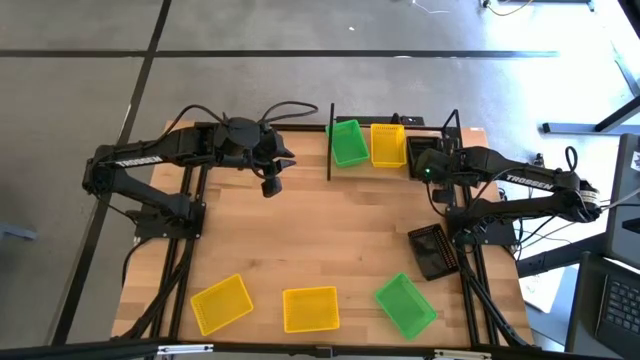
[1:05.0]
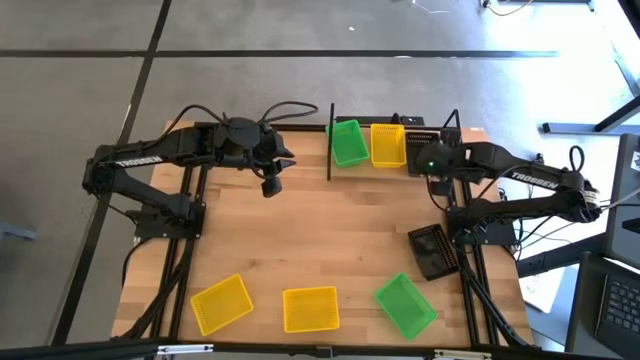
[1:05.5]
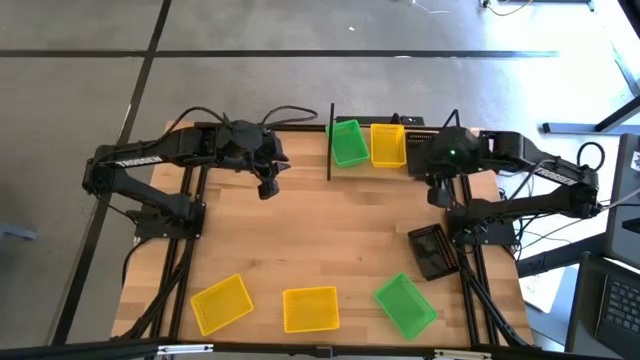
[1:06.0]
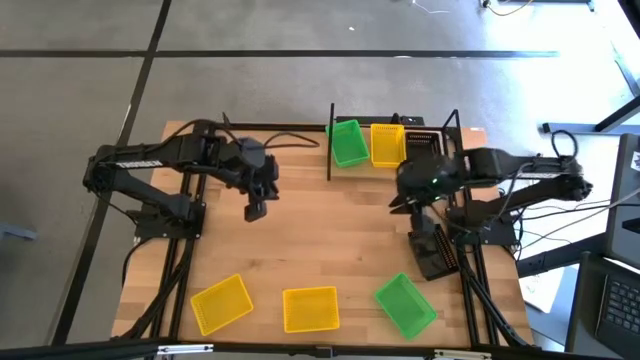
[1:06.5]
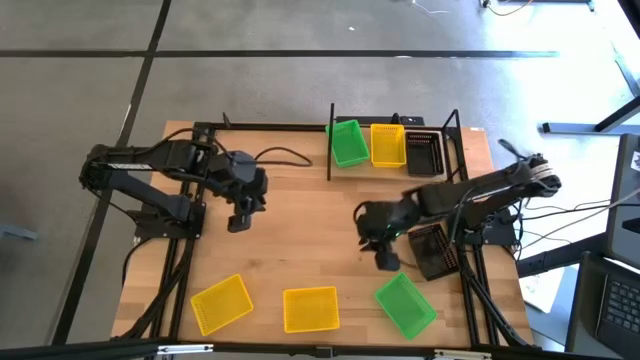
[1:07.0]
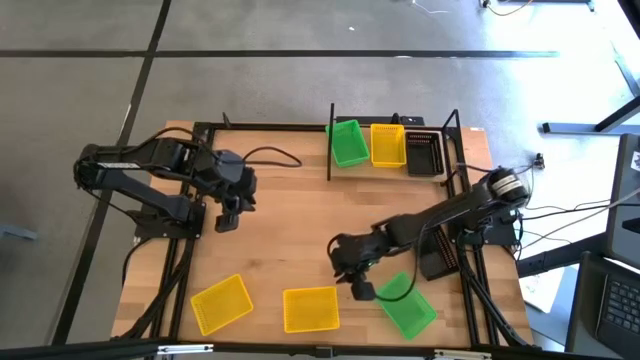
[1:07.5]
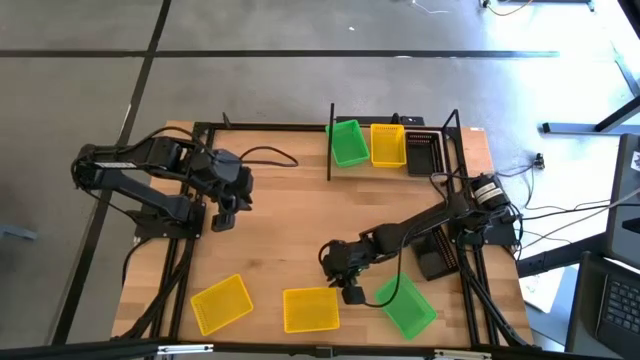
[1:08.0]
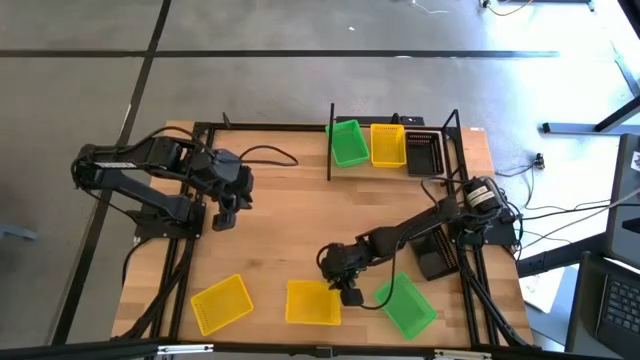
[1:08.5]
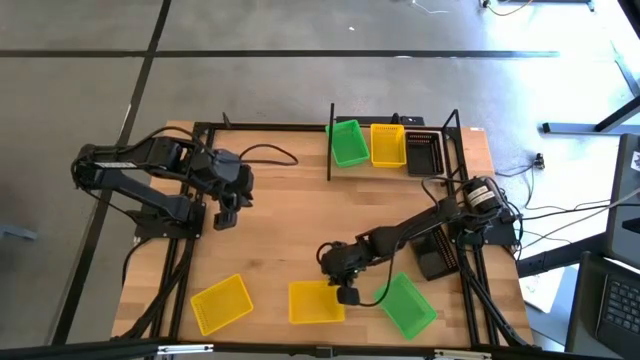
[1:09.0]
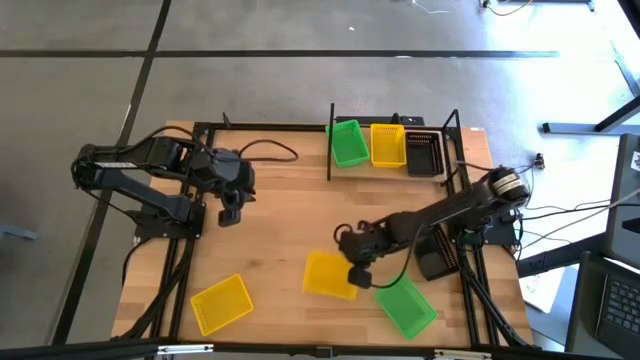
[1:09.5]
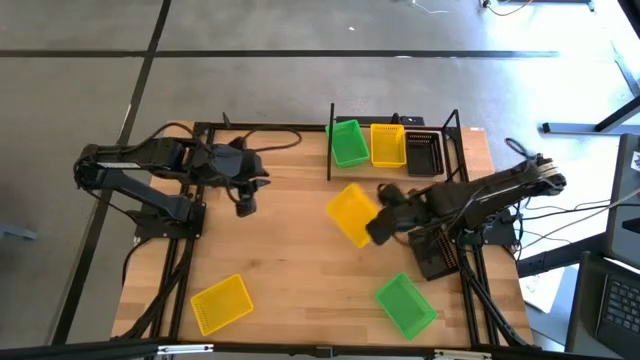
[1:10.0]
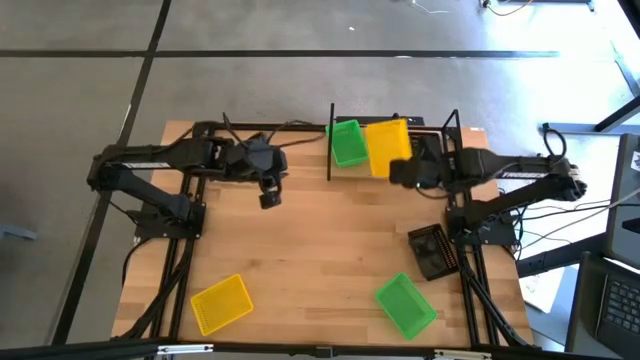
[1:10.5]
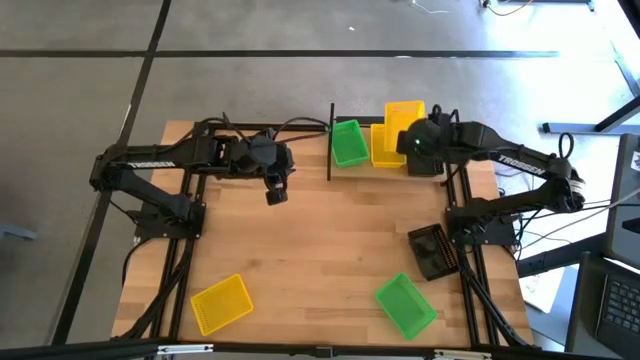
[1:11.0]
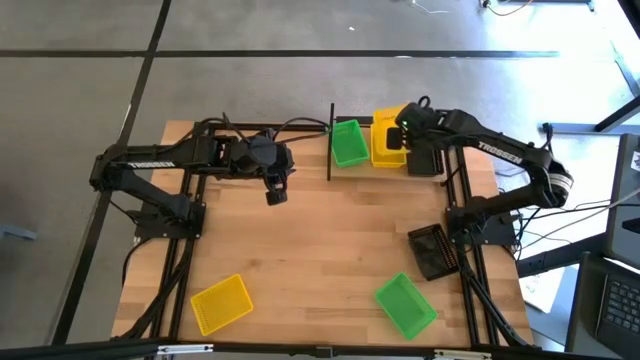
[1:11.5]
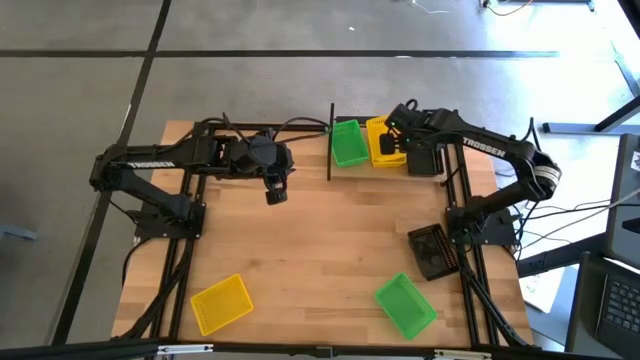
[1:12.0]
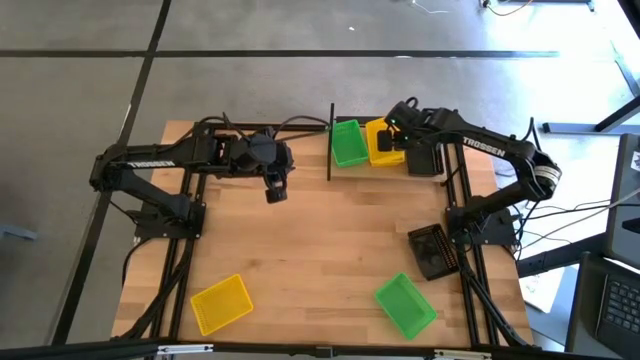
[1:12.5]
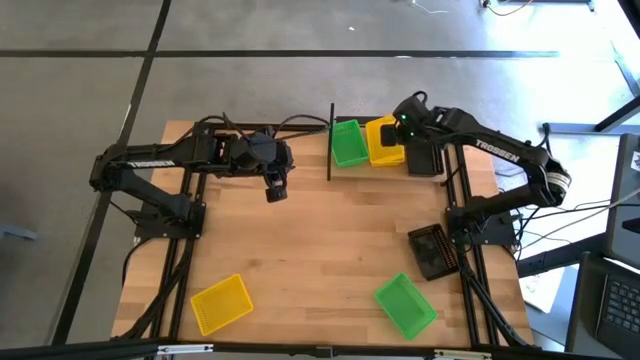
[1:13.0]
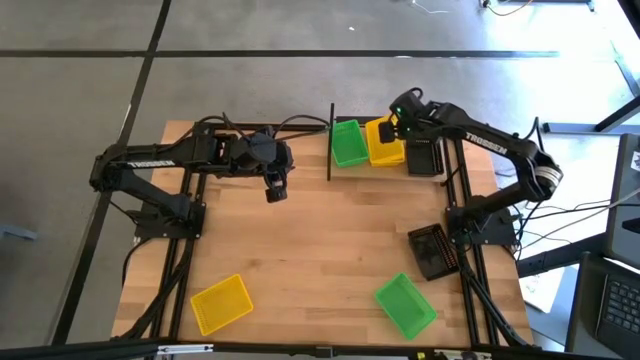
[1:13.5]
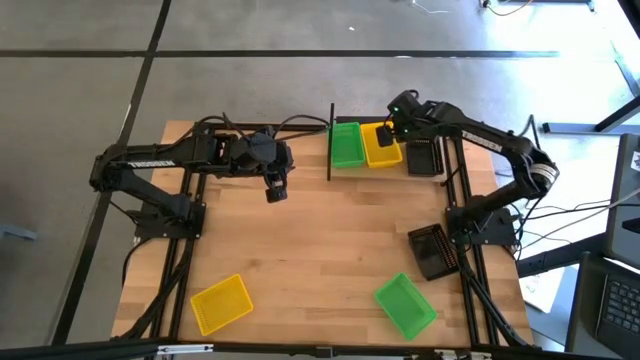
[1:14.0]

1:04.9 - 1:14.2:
Task: Stack baskets on shelf by color
Stack the right yellow bin on the yellow bin on the shelf

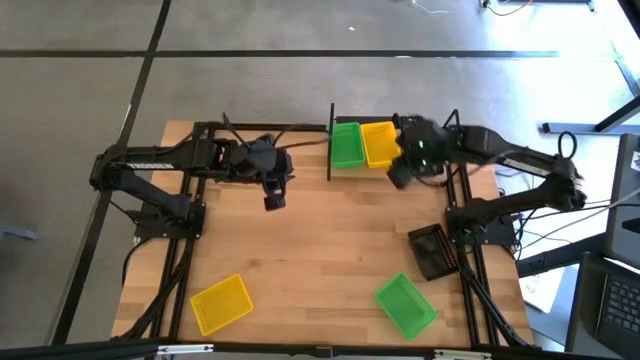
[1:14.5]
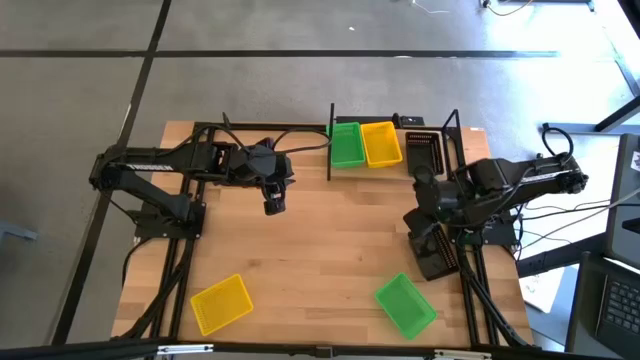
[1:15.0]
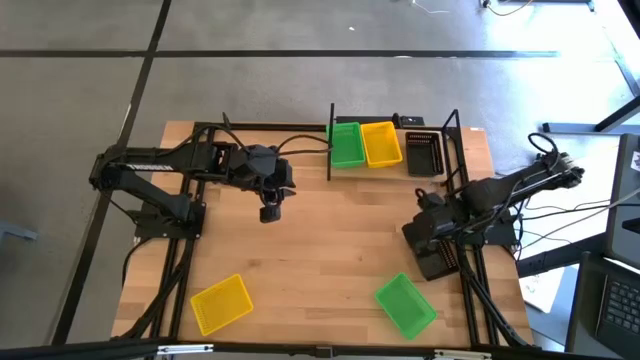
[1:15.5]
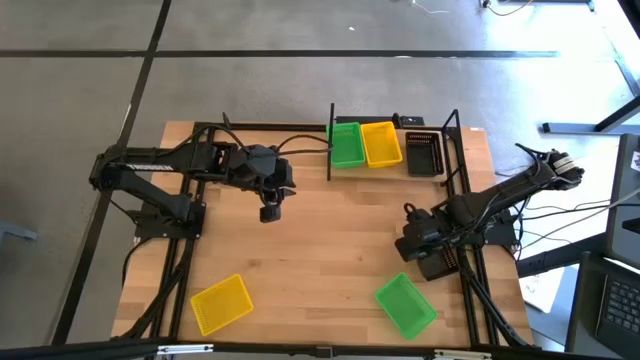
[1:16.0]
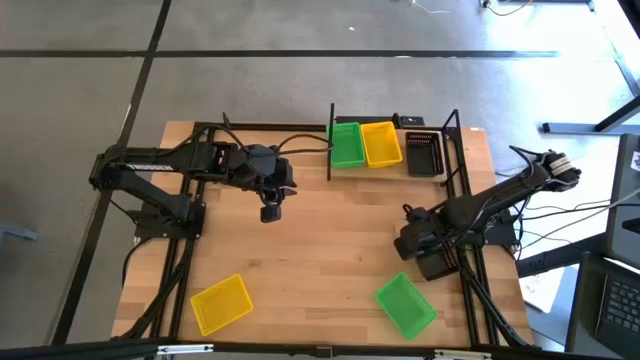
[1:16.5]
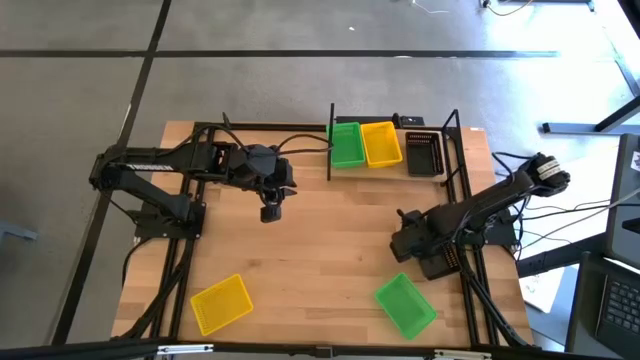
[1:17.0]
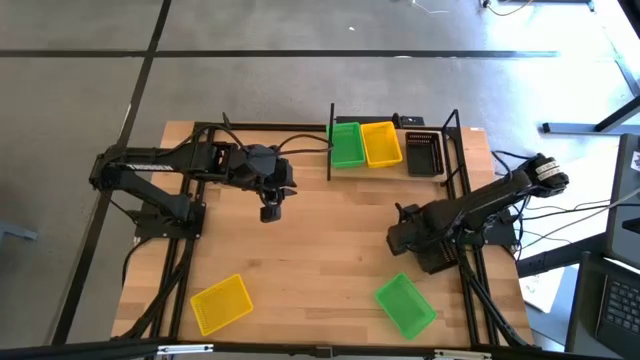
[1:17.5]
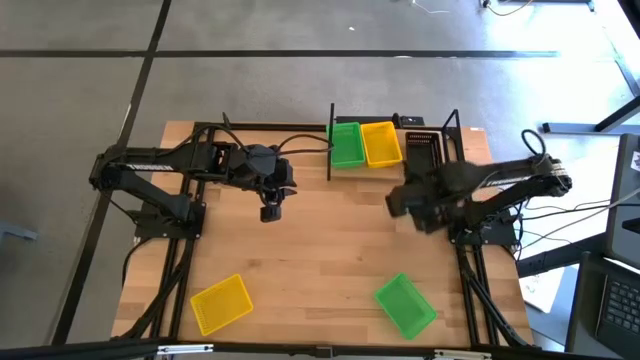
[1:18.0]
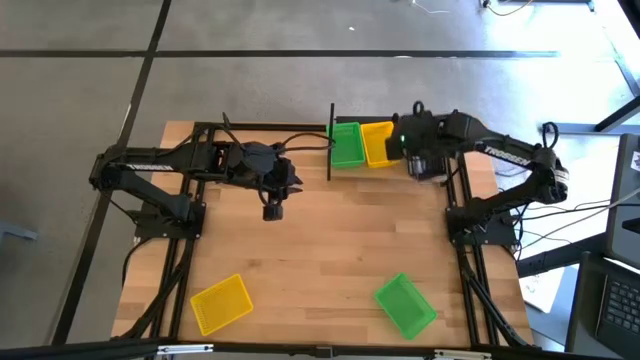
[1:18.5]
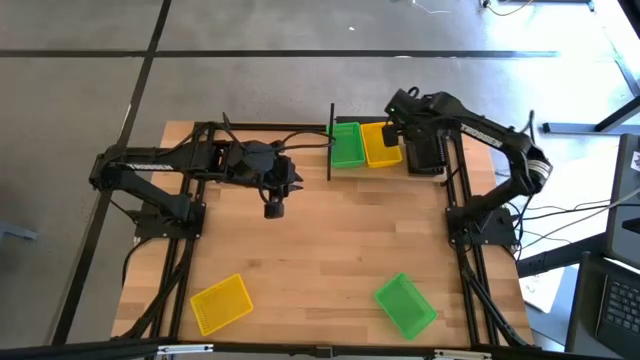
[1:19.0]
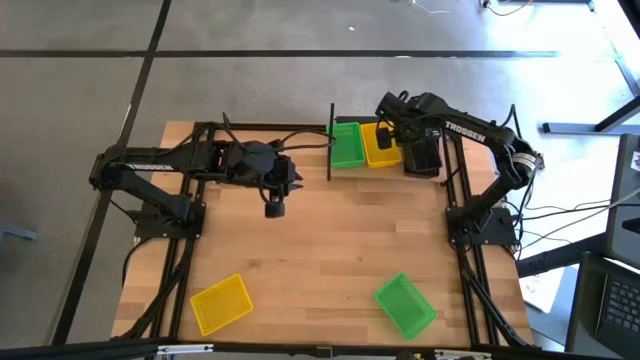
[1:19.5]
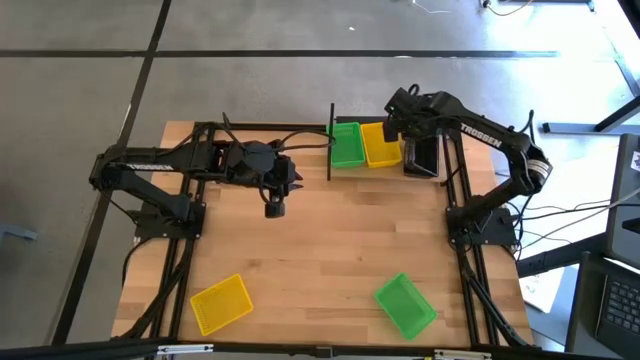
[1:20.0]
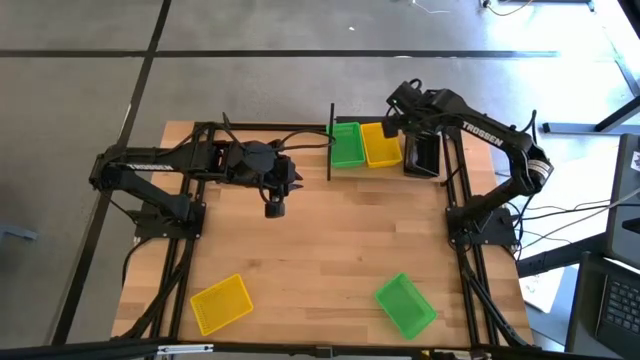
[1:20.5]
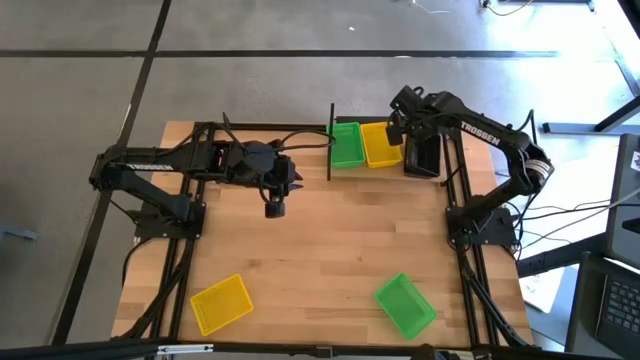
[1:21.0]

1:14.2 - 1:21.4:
Stack the black bin on the black bin on the shelf

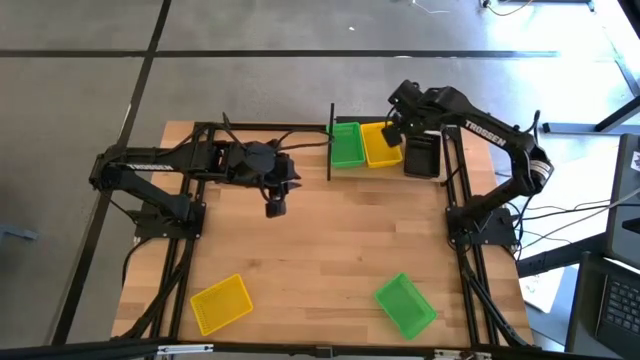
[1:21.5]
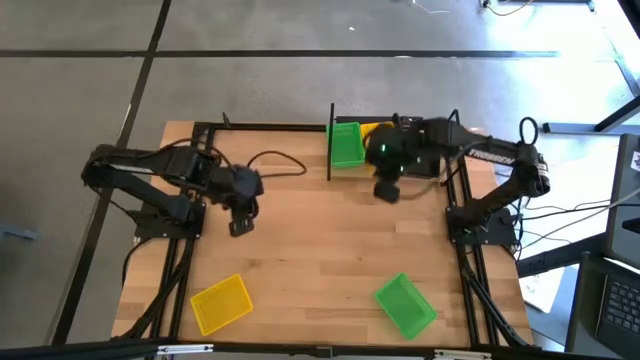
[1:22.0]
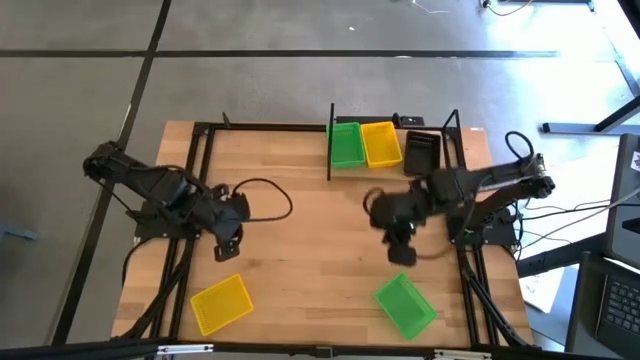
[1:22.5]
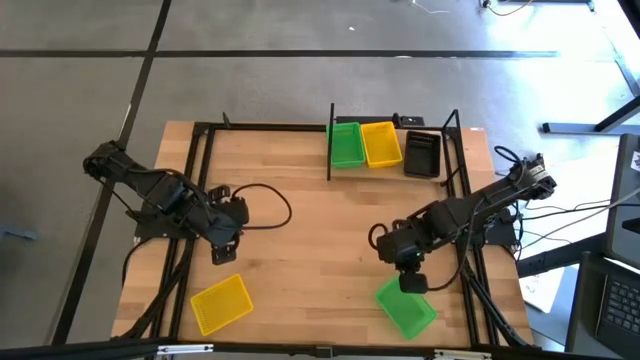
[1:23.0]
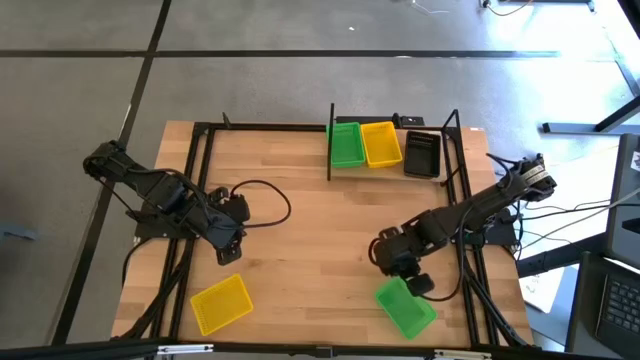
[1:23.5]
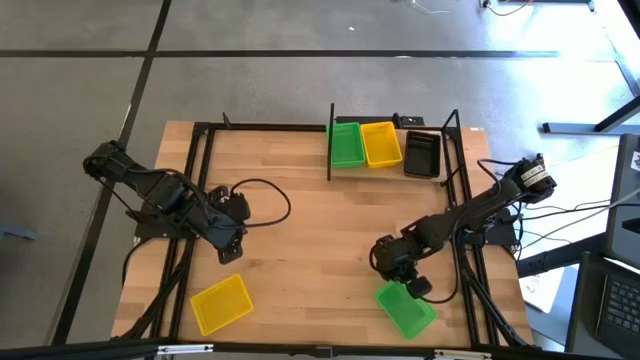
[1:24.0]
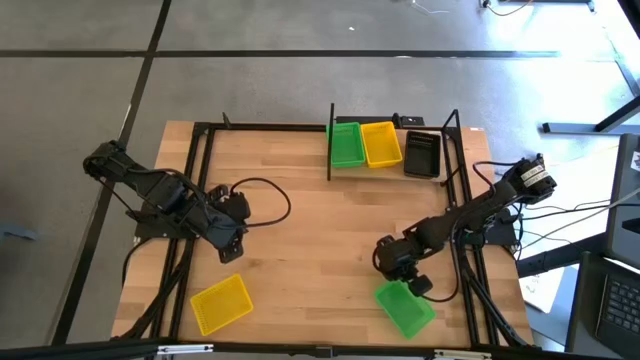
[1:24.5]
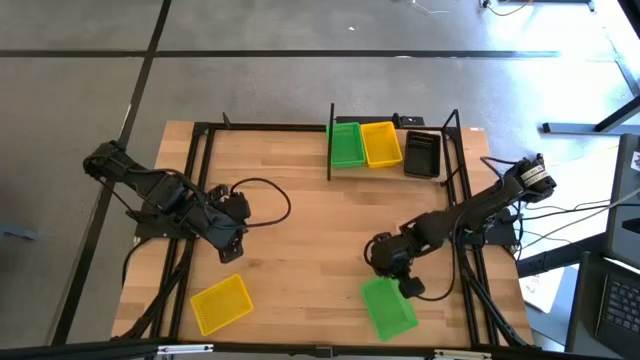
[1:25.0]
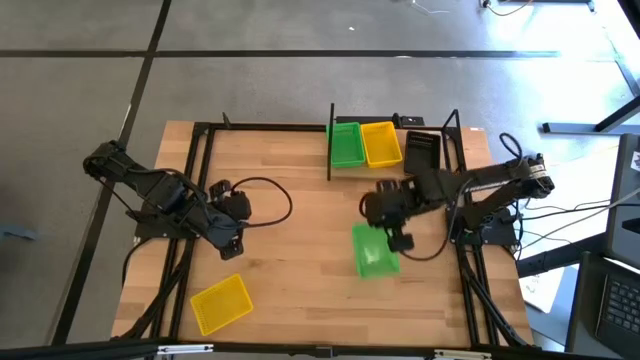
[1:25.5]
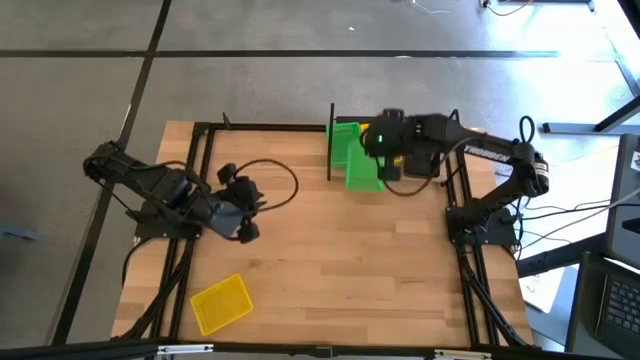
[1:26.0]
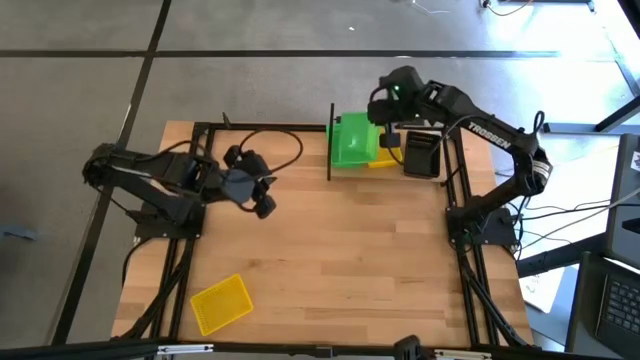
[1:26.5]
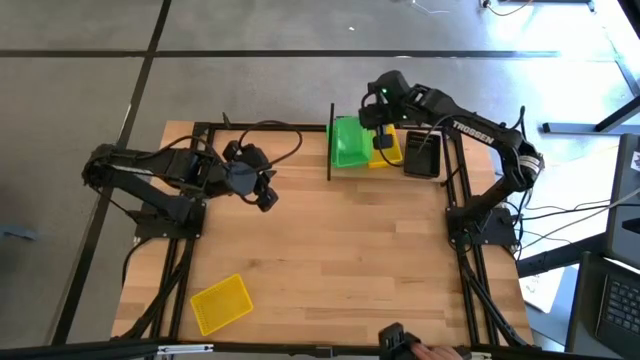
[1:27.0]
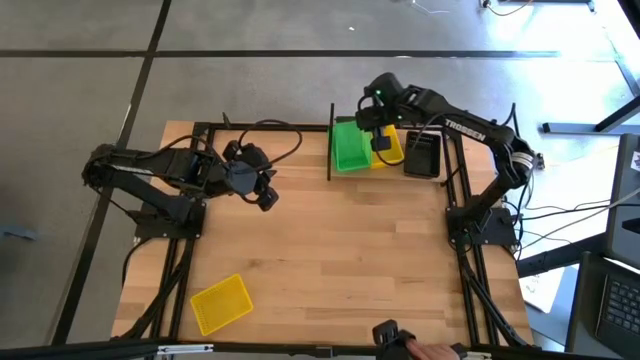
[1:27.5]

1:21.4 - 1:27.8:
Stack the green bin on the green bin on the shelf
